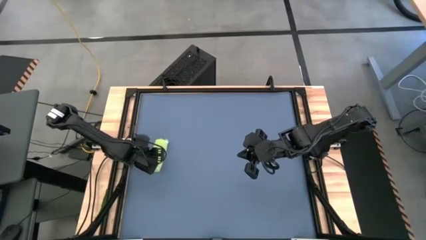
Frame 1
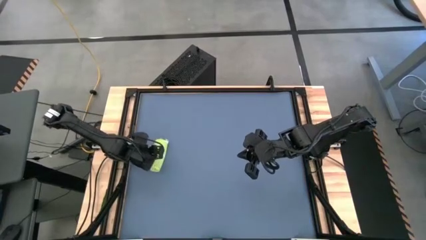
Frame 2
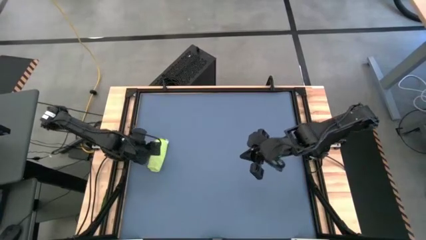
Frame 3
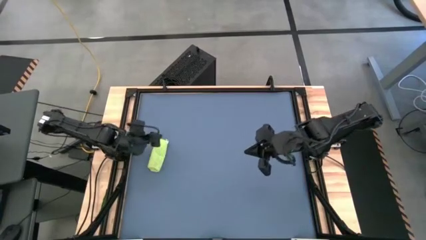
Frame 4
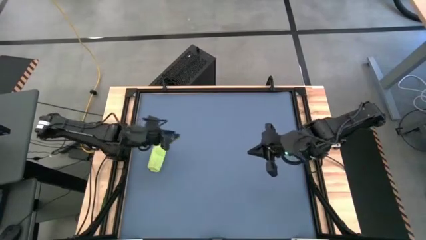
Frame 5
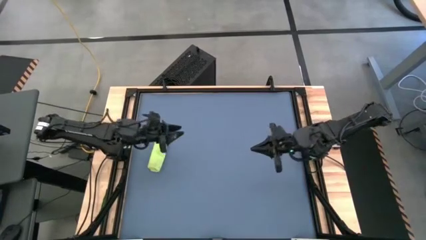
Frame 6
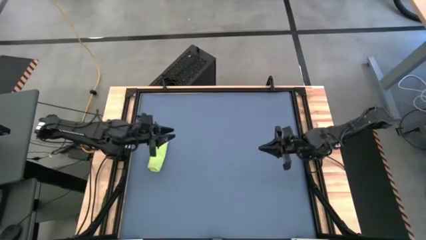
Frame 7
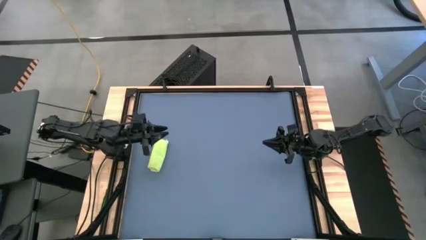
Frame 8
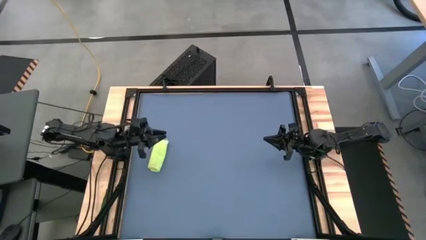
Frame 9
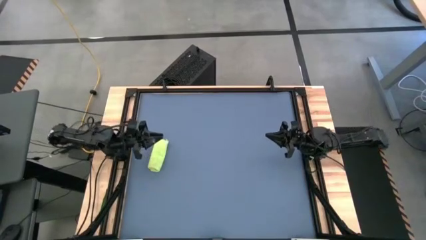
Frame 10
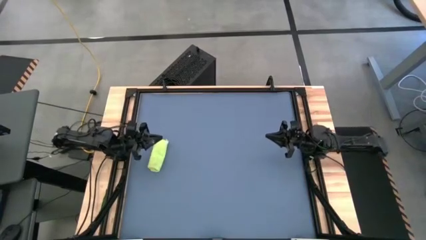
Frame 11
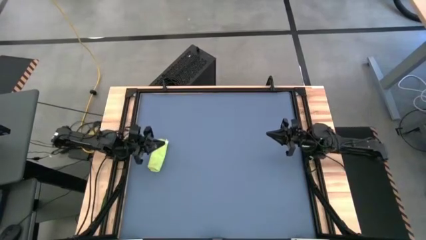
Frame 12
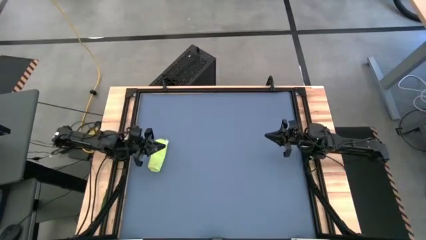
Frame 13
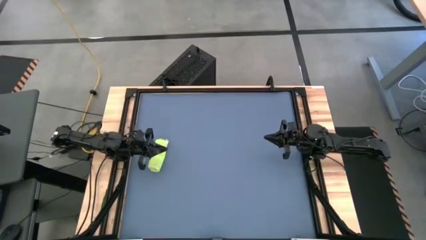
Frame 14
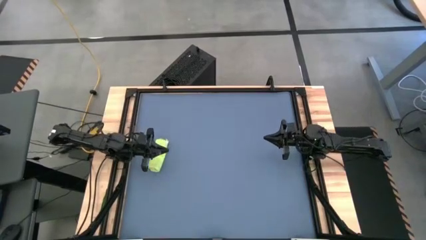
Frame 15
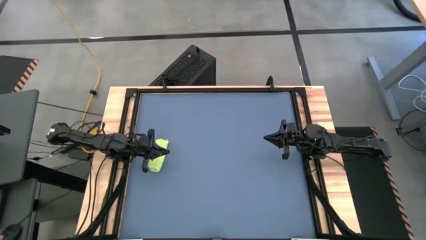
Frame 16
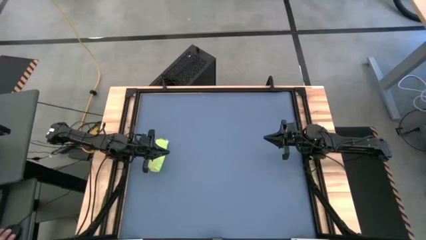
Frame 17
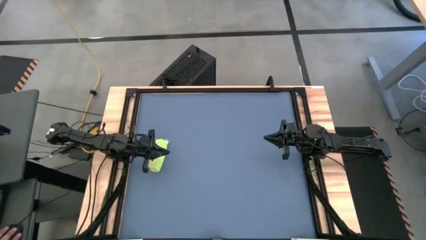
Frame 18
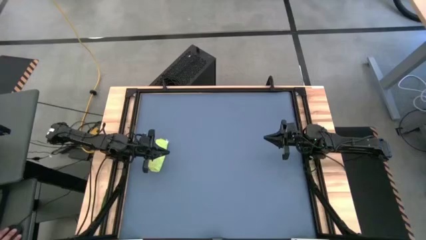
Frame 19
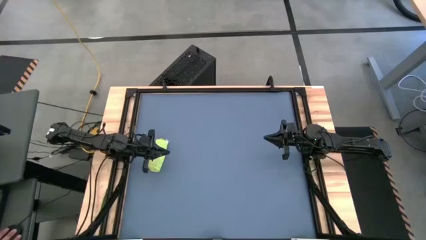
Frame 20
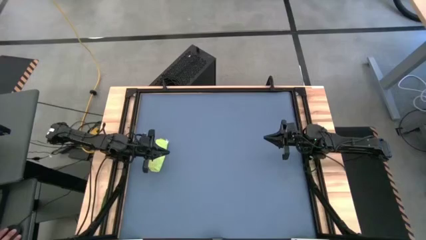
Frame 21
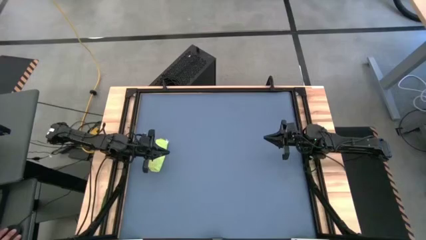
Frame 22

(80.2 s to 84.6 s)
Task: Roll towel
Return to Home Position

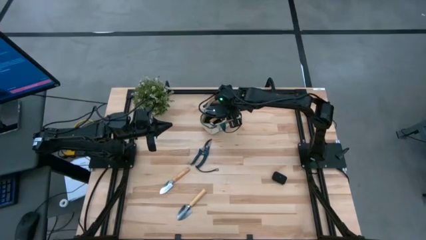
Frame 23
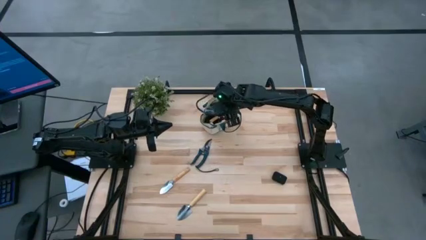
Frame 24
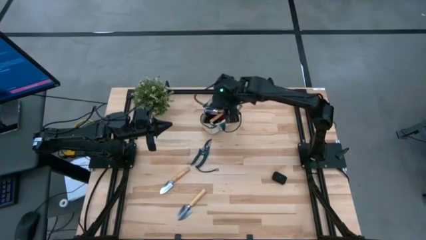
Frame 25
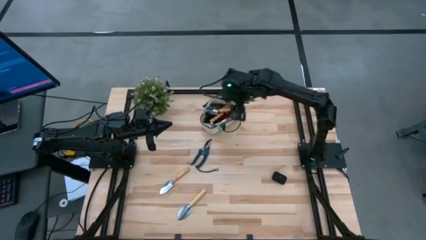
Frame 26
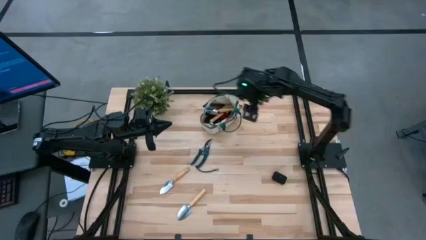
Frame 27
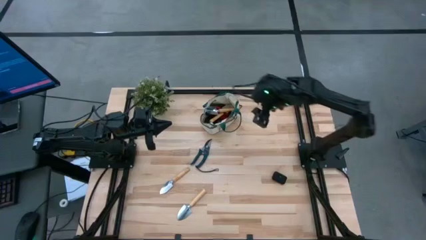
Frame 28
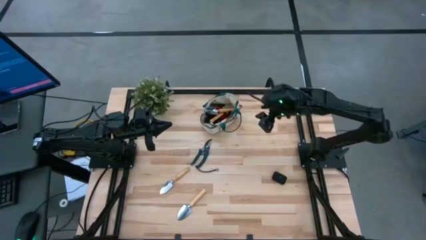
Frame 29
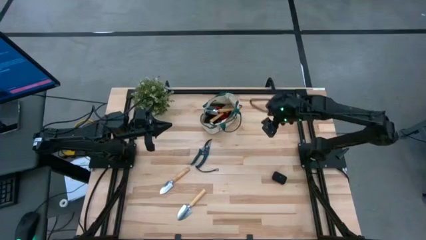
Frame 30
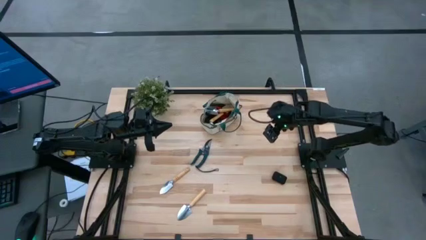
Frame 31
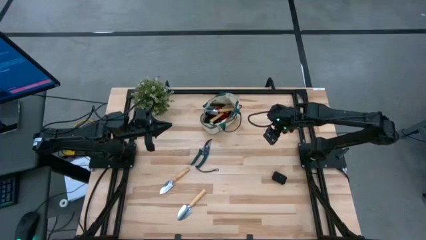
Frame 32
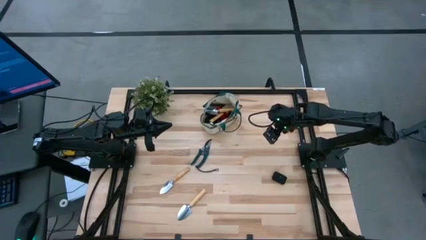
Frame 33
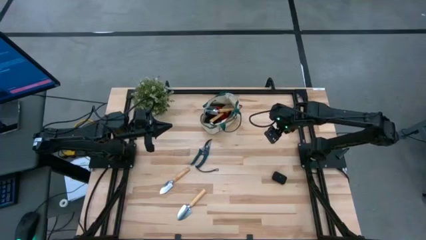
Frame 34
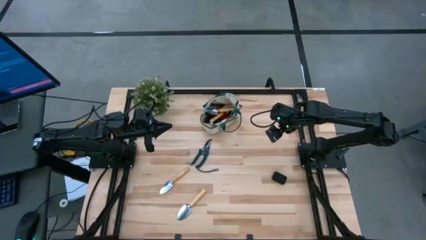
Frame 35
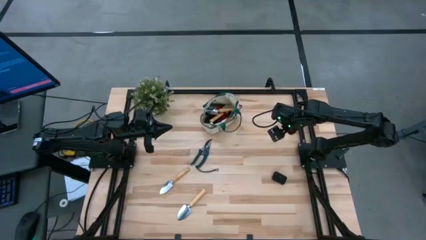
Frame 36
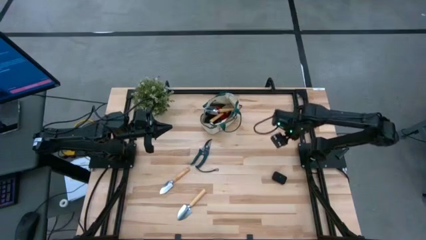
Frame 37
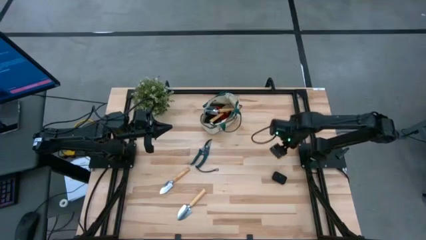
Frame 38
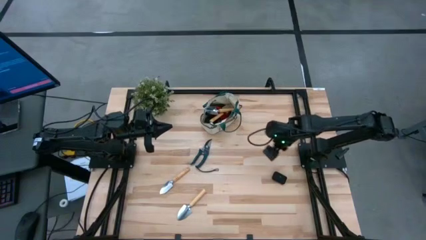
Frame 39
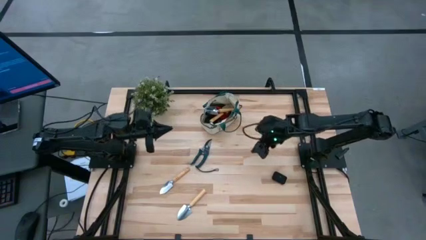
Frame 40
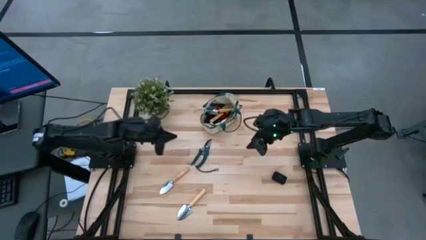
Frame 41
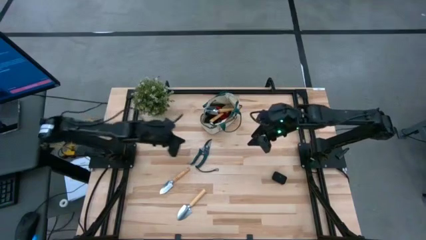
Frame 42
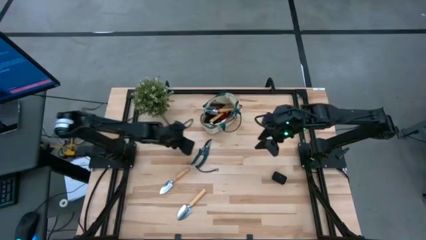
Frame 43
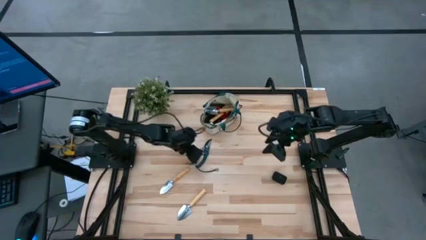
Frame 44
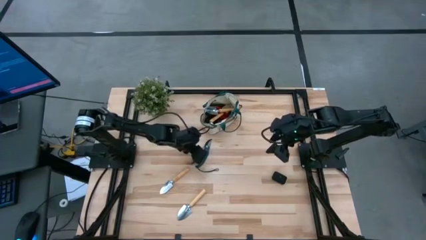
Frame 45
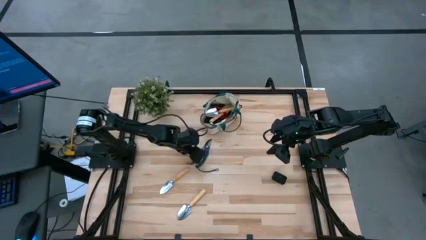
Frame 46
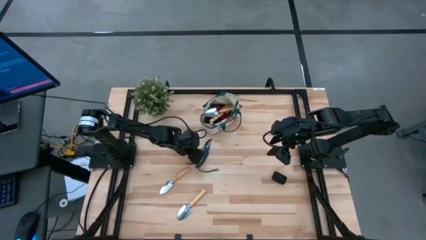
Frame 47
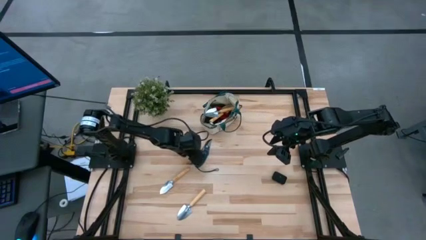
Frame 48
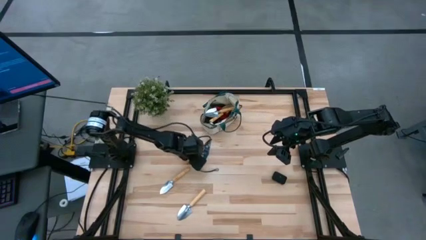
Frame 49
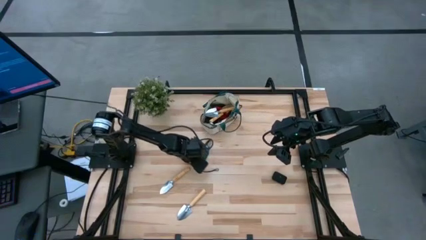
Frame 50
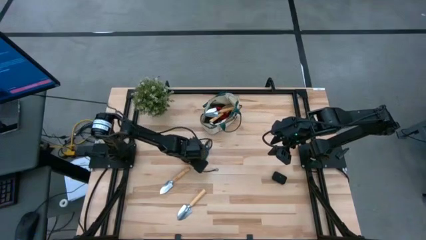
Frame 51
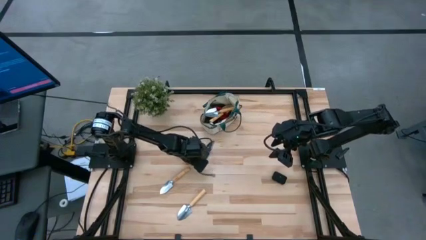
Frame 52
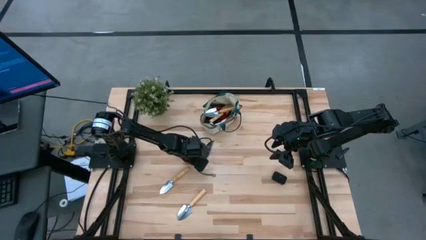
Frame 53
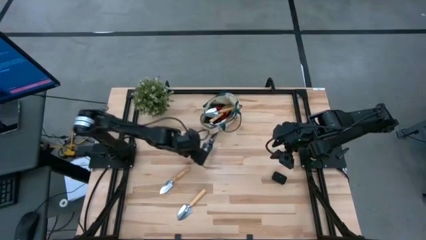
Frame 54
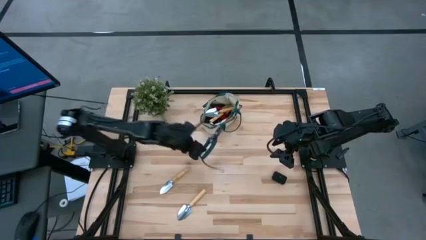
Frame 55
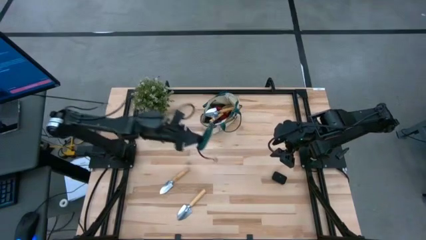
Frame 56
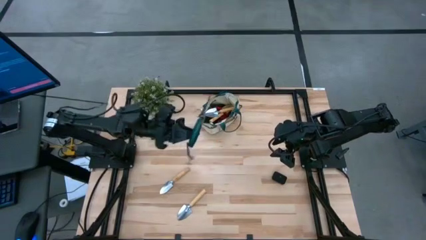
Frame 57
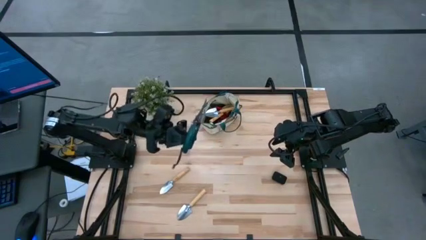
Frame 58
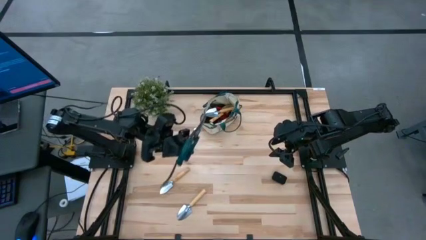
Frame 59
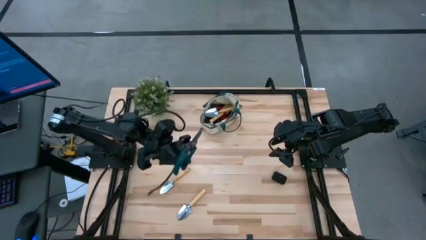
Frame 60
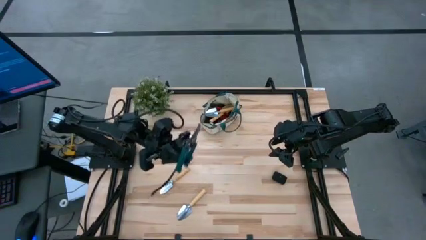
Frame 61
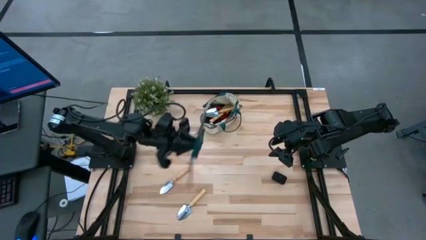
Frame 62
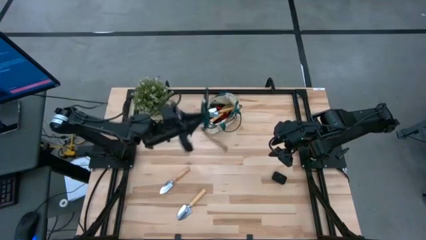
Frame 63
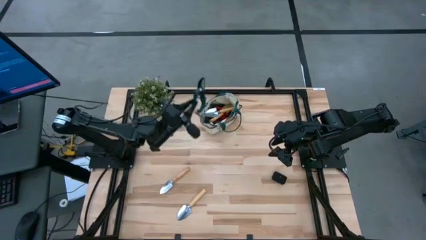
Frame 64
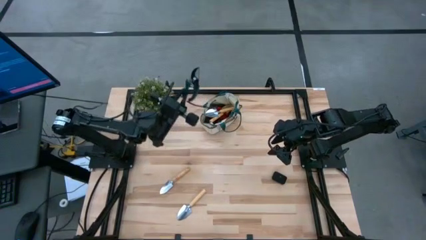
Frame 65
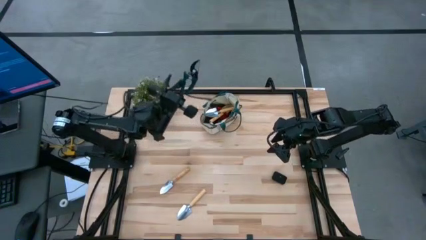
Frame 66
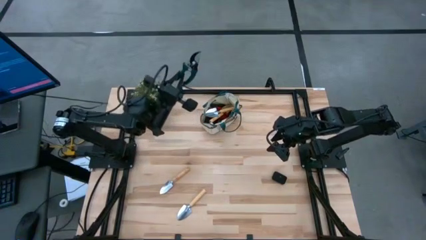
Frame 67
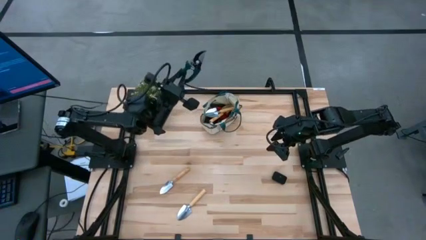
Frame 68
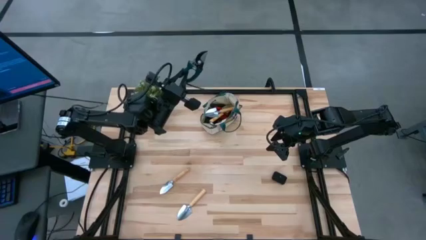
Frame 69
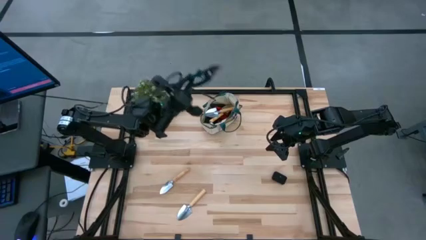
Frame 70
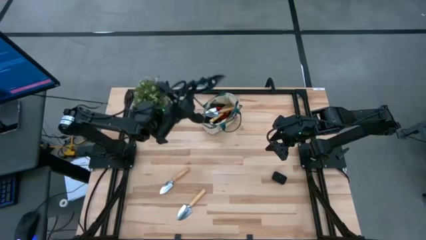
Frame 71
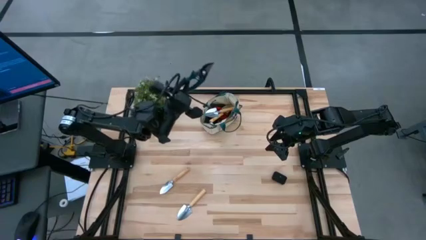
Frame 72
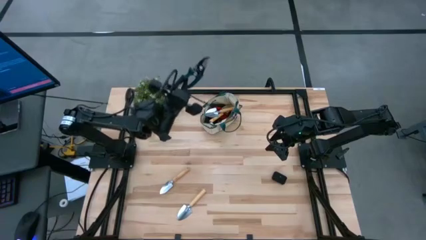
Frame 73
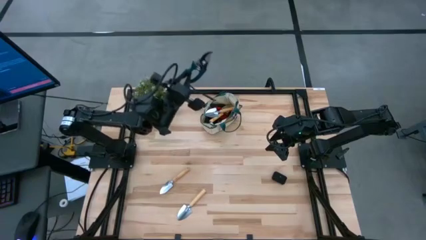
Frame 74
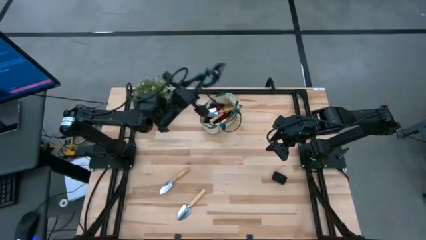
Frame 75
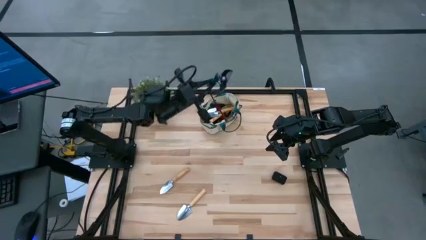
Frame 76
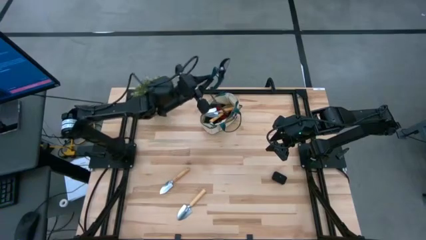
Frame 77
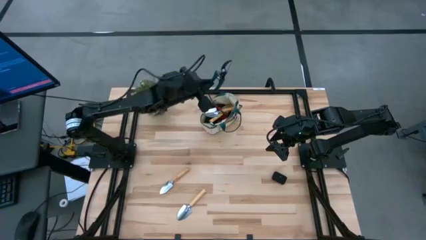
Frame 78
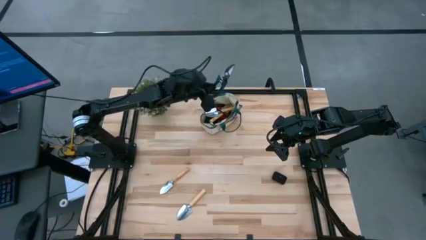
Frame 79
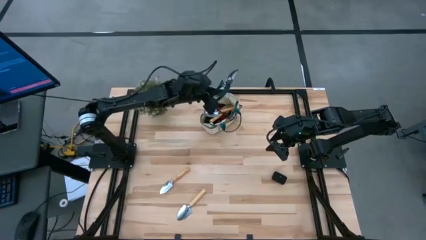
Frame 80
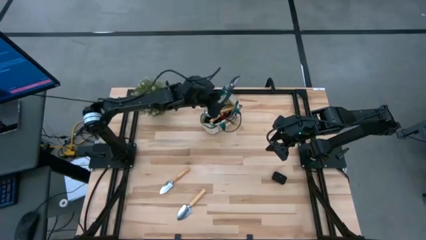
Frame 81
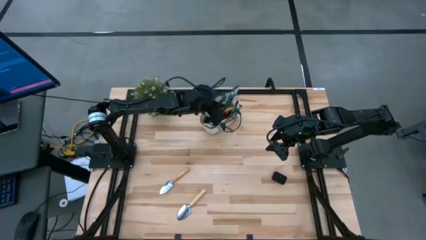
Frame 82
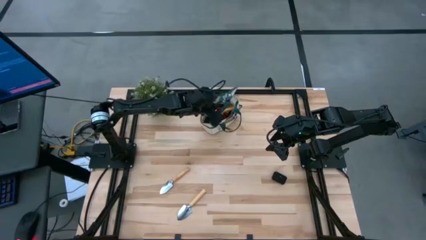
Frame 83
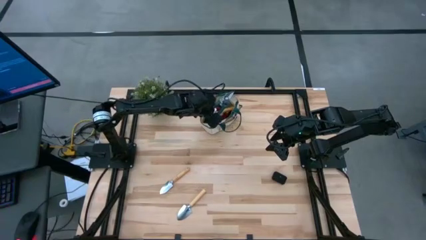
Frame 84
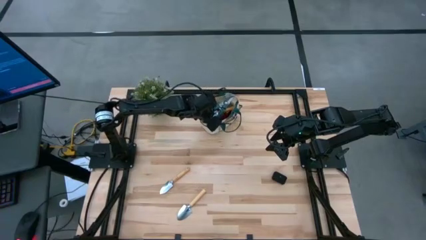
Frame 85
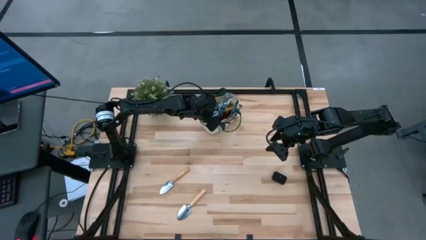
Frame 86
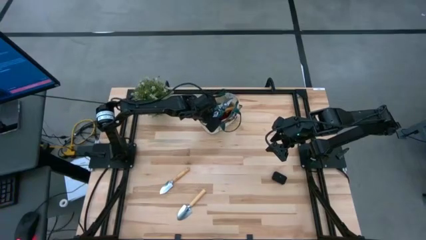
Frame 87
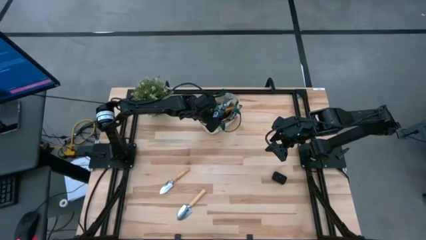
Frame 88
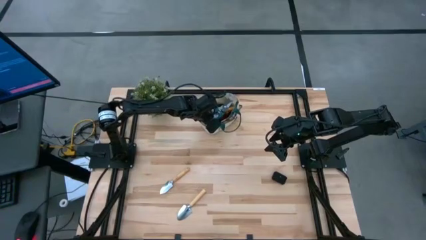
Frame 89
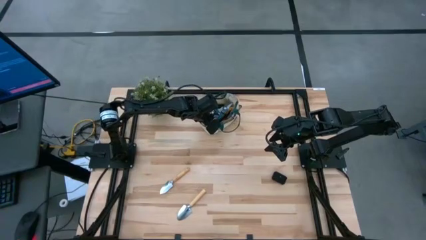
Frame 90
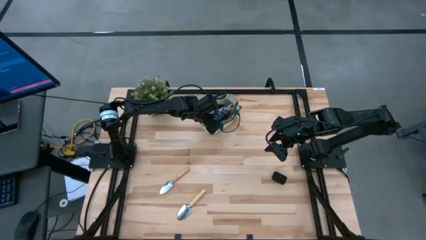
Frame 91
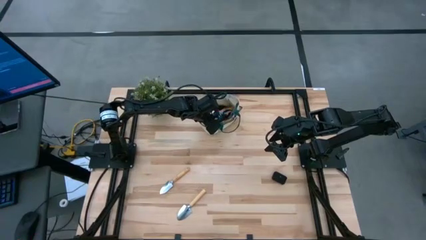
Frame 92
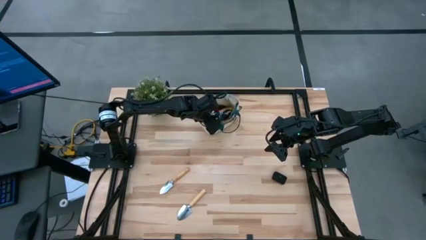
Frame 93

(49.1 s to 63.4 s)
Task: Pick & Place Garden tools in Gardening bag
Put the green shear scissors into the light brown gardening bag
